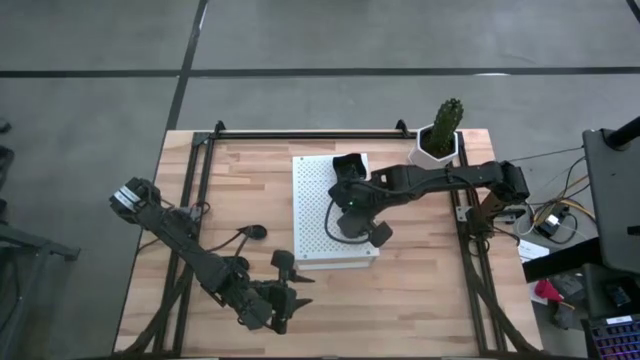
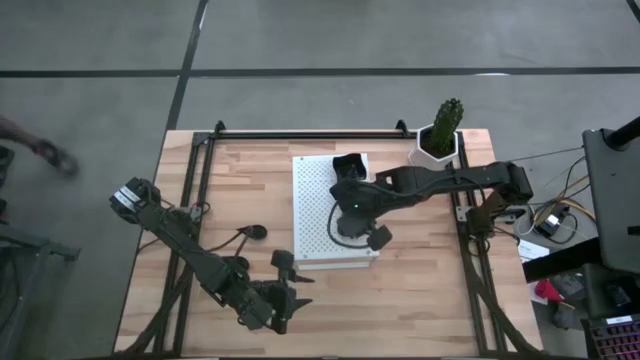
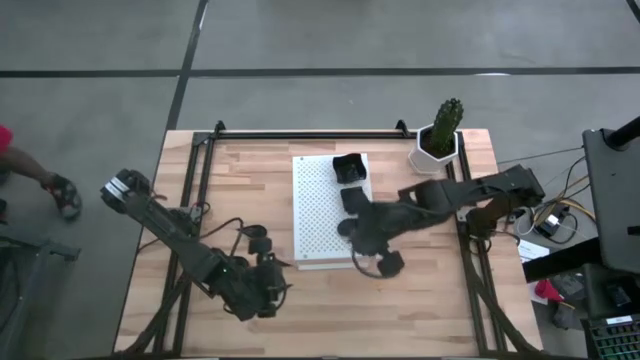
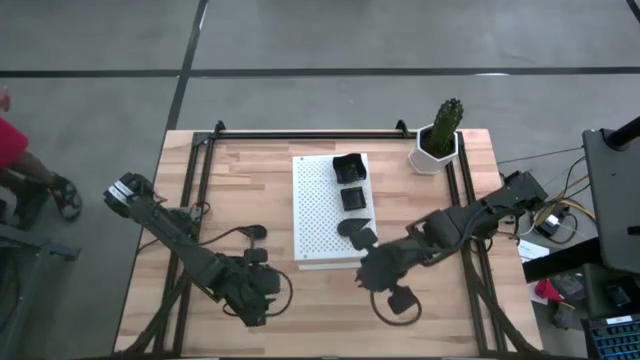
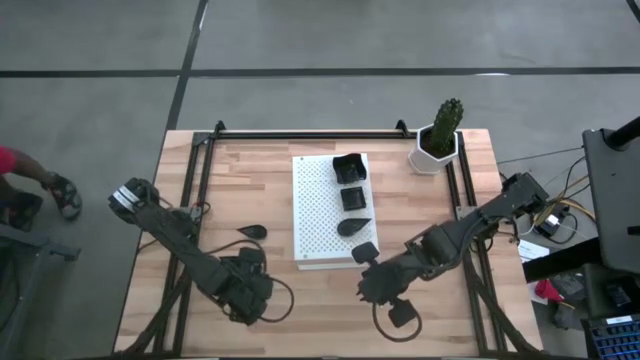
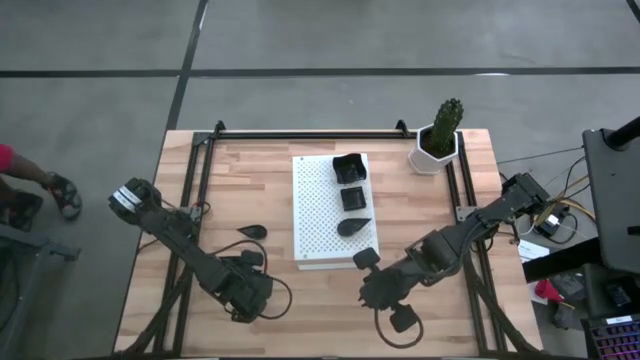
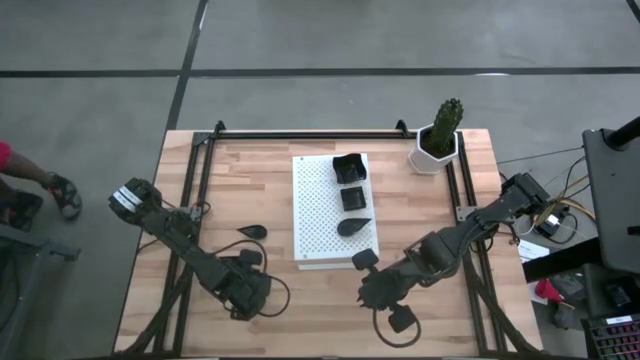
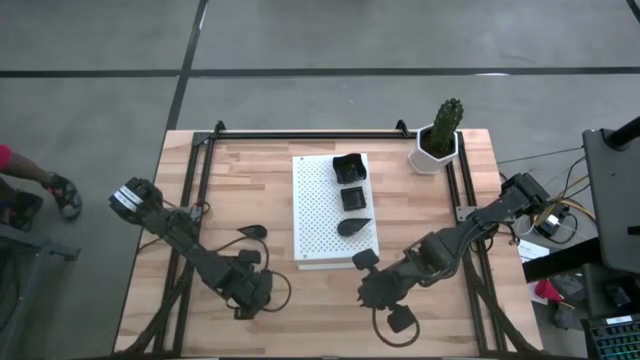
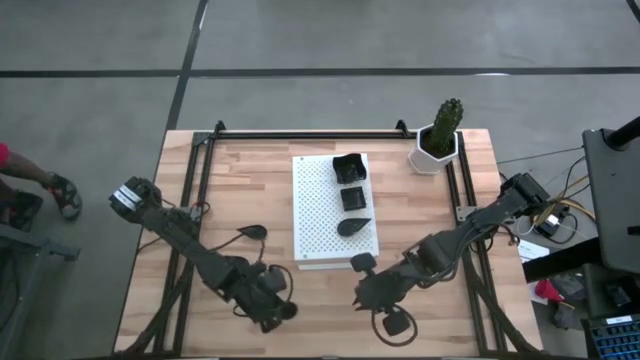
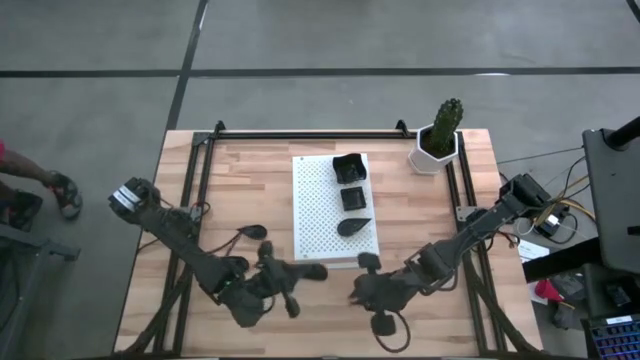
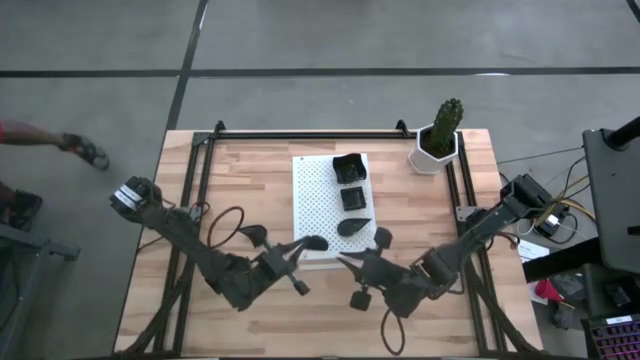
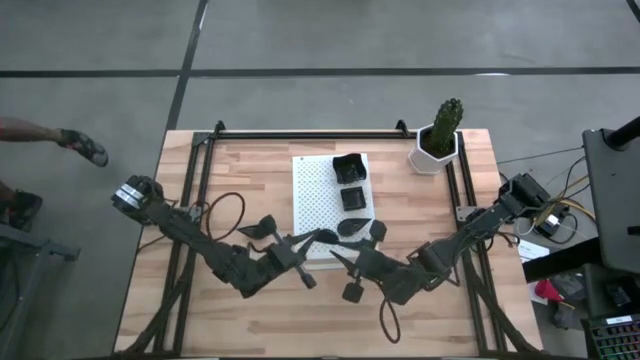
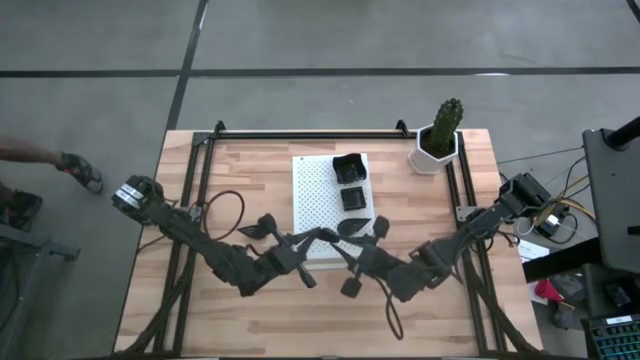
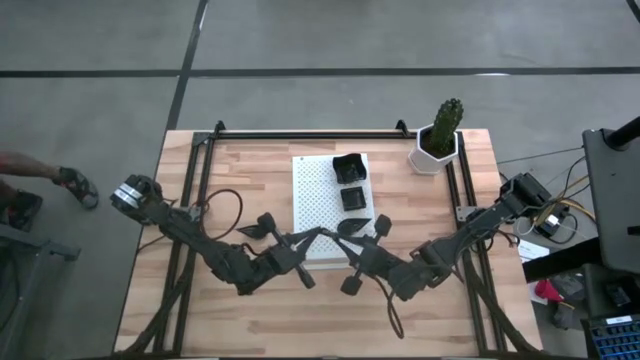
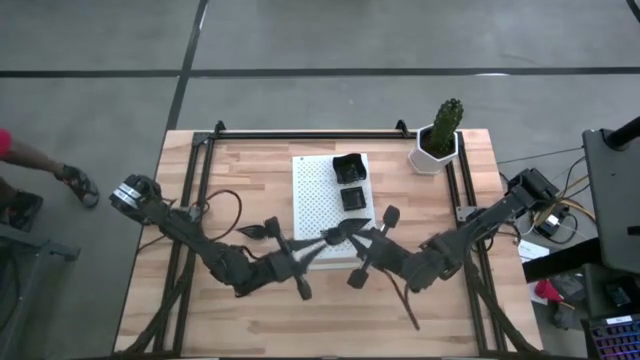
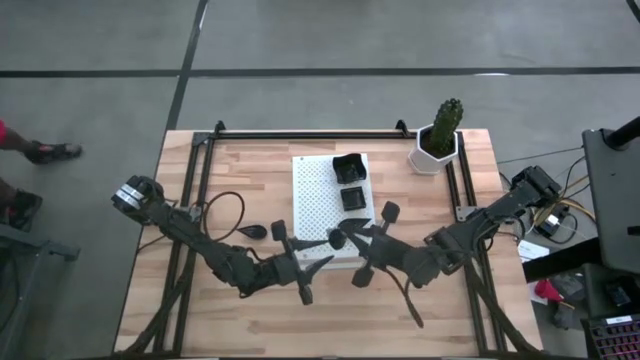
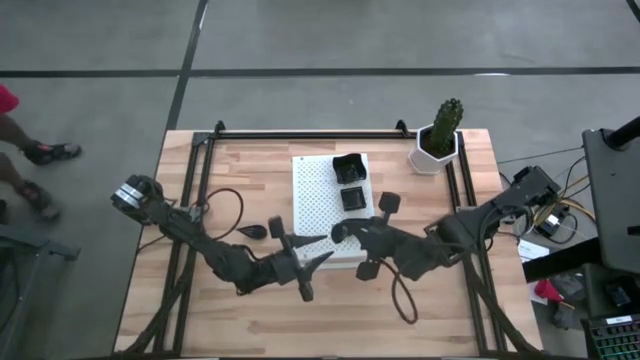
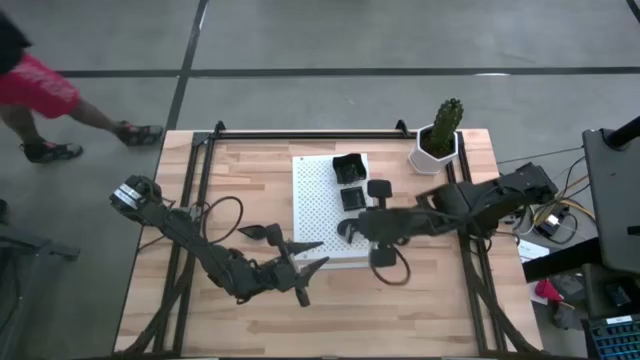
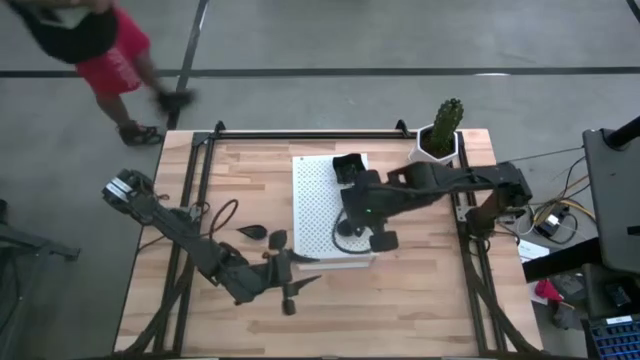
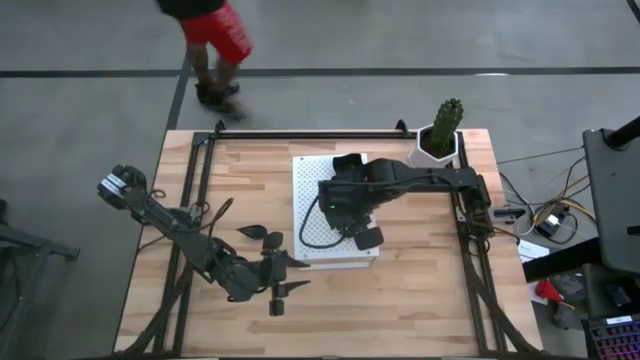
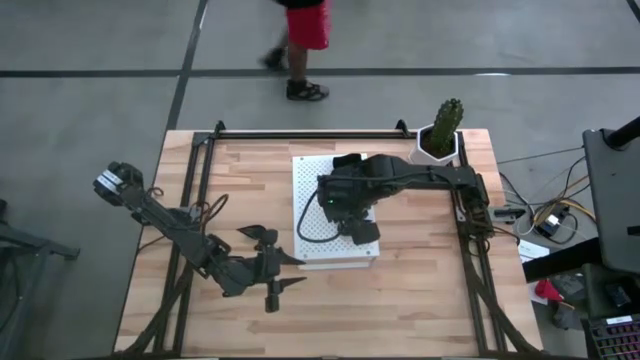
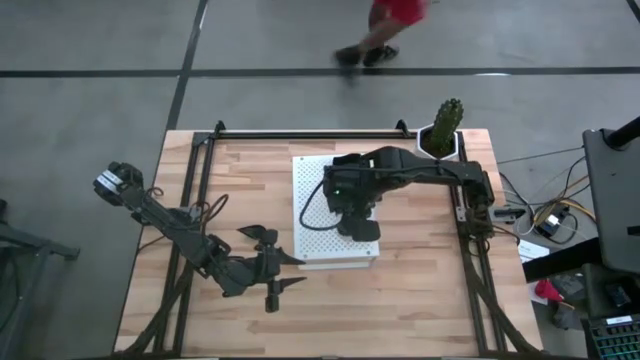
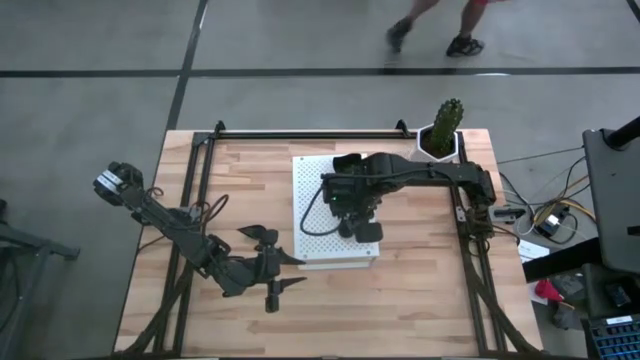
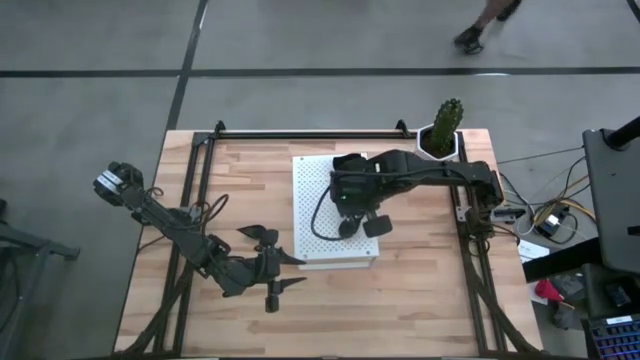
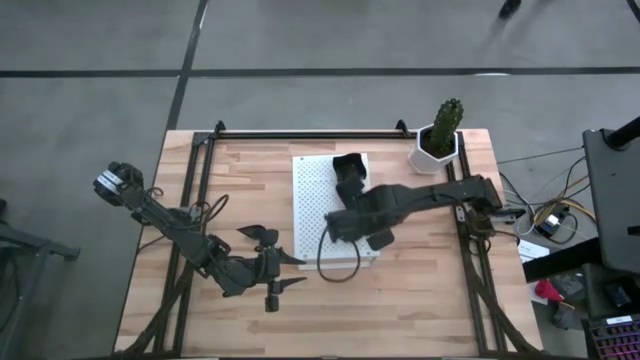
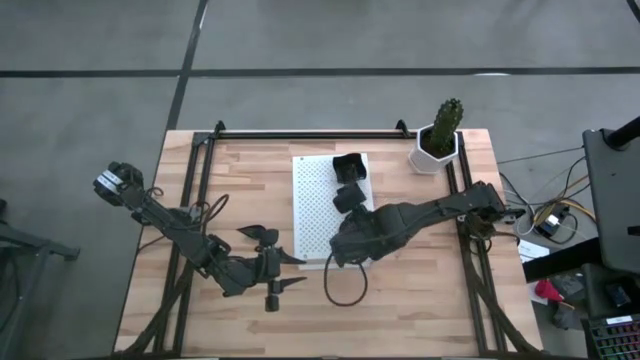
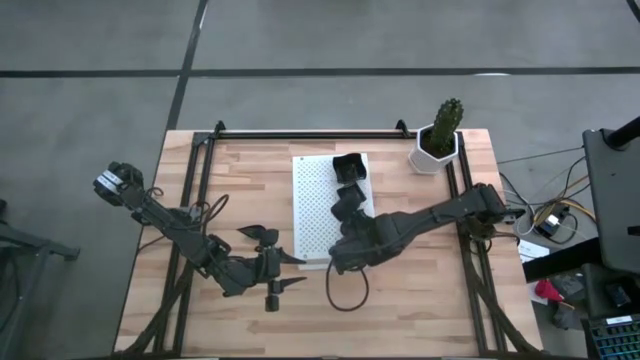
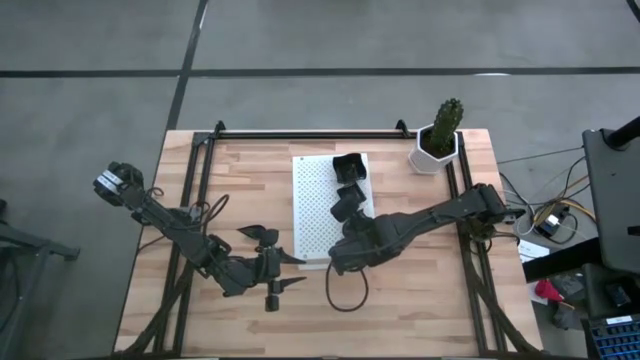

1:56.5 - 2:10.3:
Task: Pick & Place Mini shaped plates
Stack the black drop-shaped plate on top of the black drop-shaped plate on the shelf

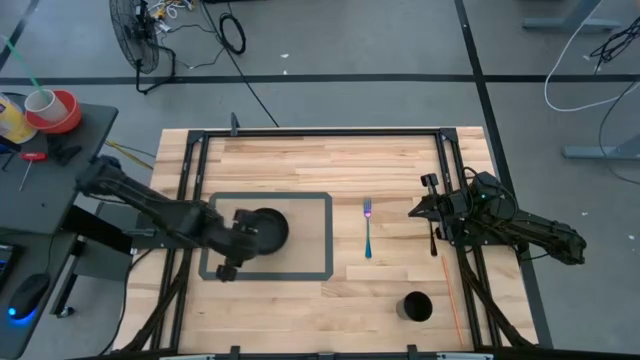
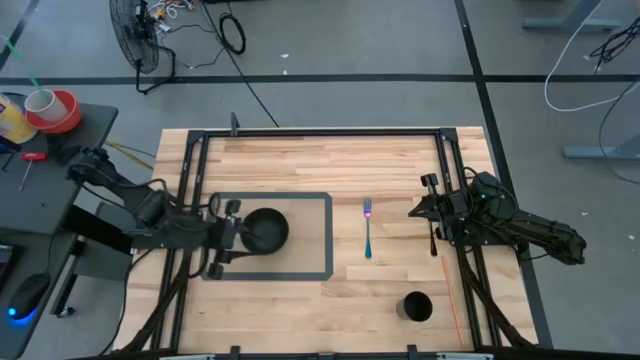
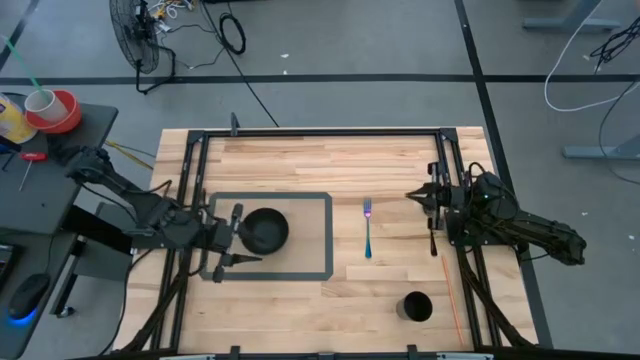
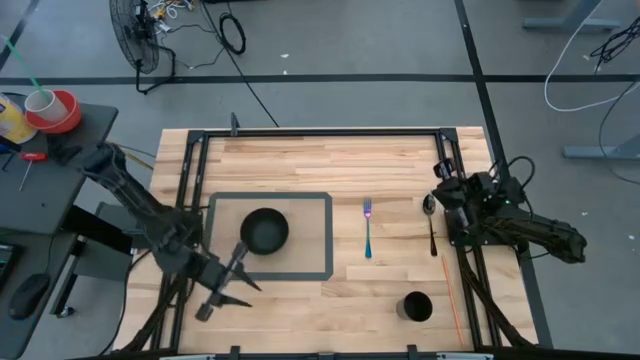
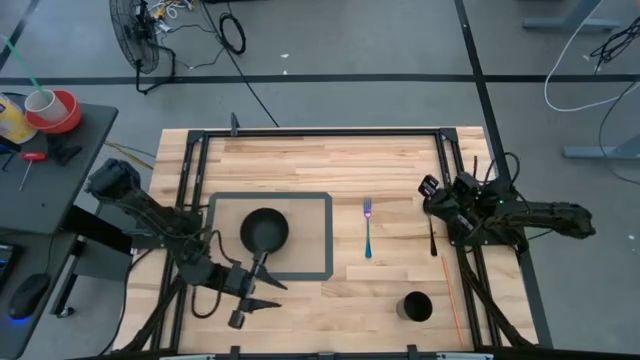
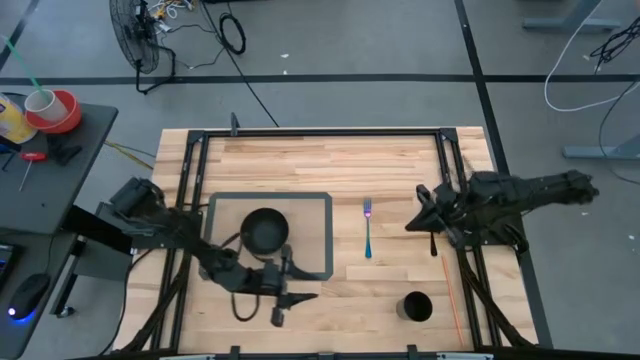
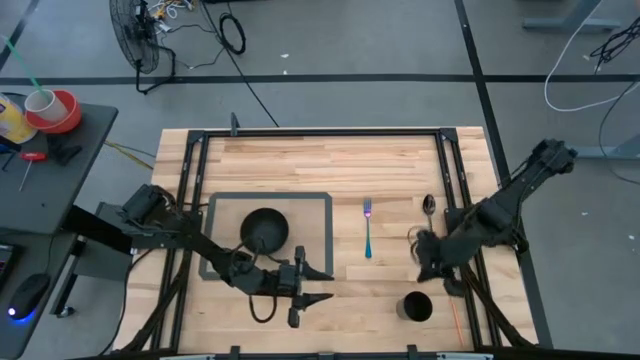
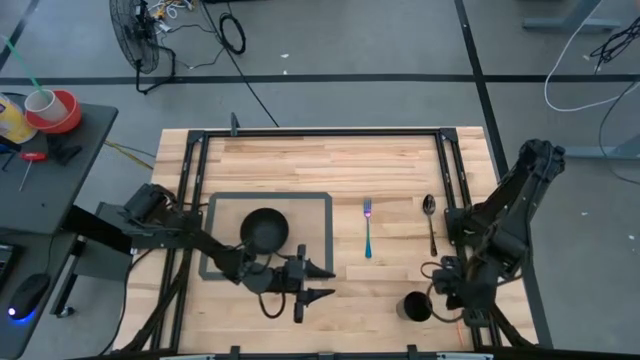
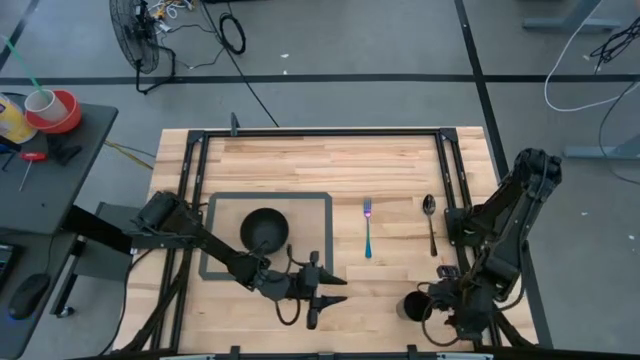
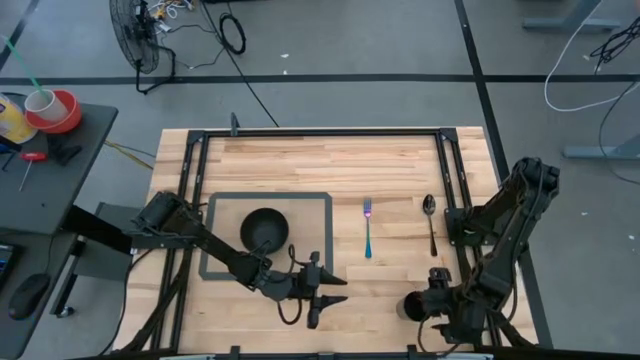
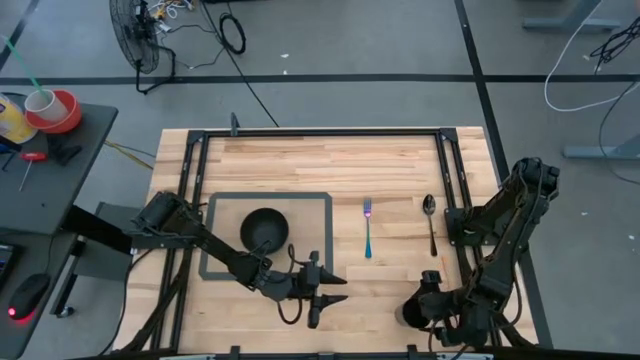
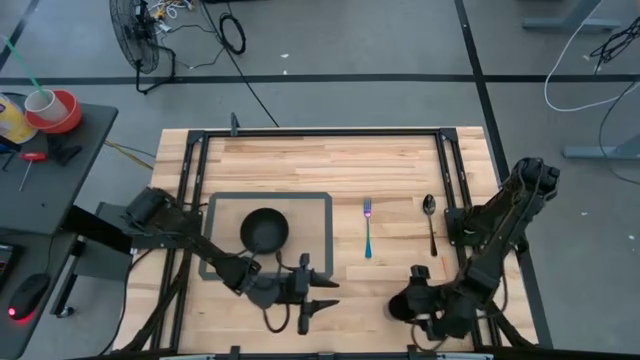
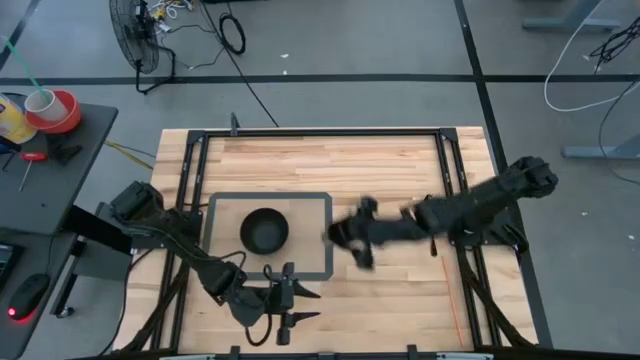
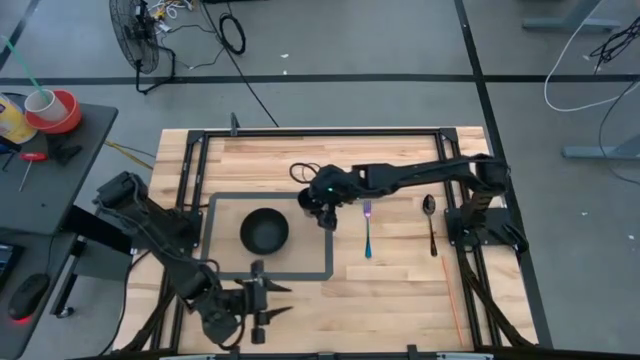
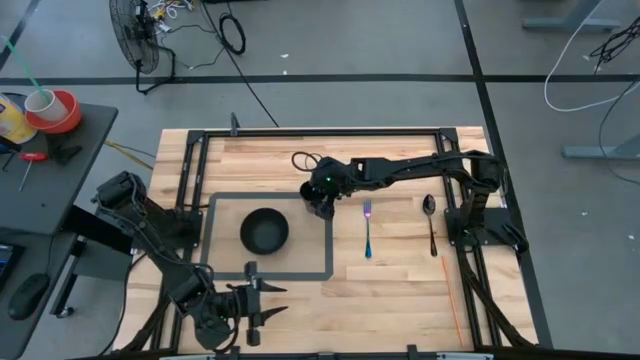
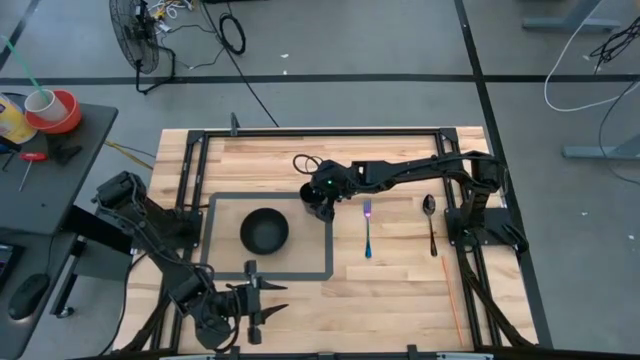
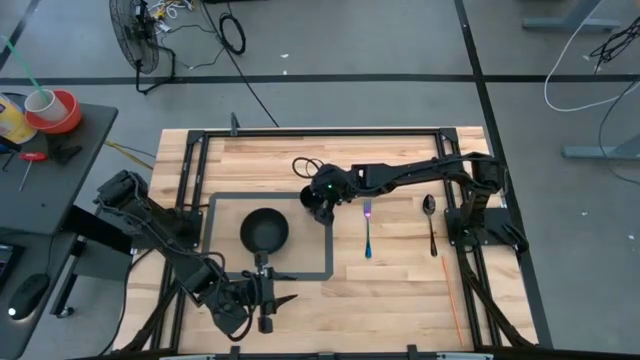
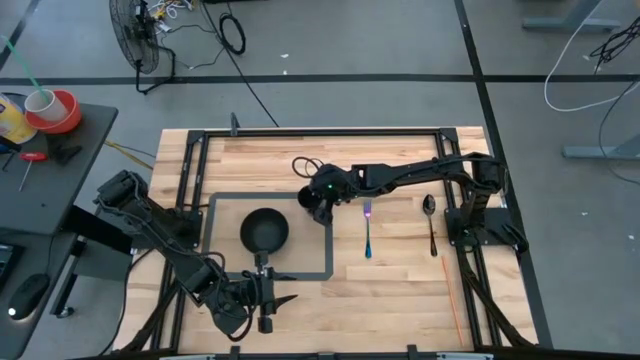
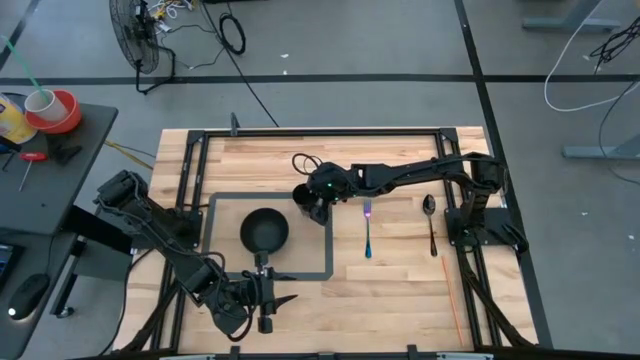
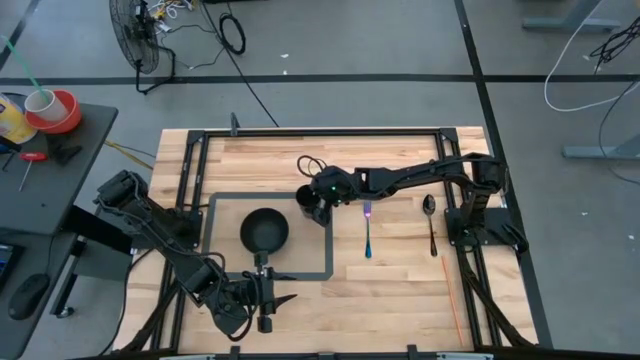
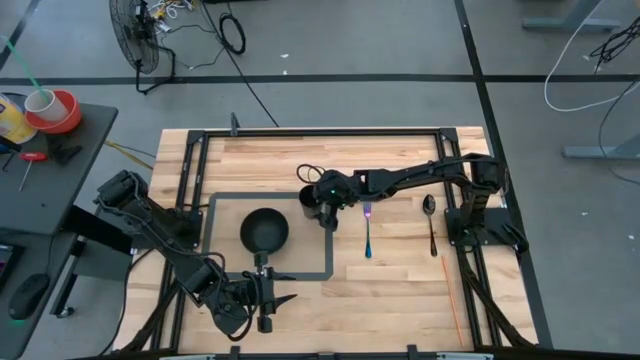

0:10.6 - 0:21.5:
Task: Pick & Place Utensil
Put the black cup on top of the black bowl on the table mat
